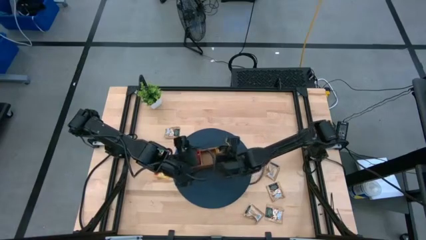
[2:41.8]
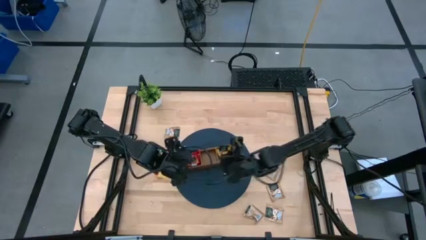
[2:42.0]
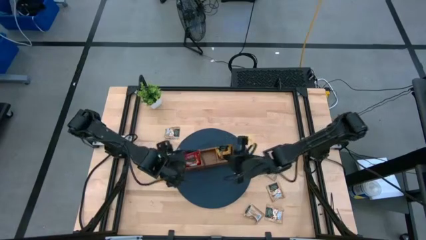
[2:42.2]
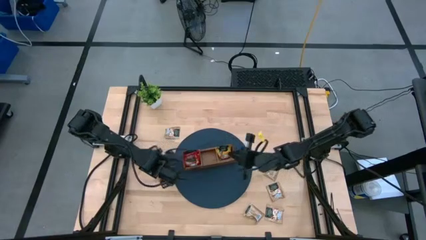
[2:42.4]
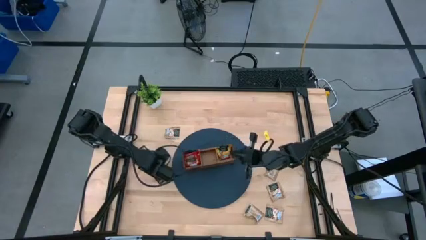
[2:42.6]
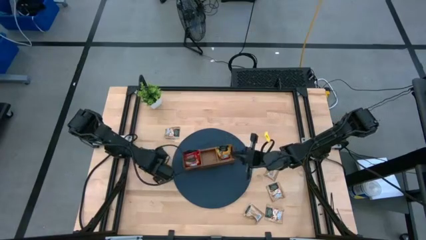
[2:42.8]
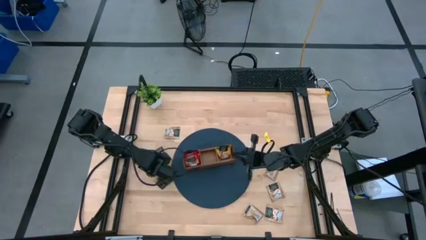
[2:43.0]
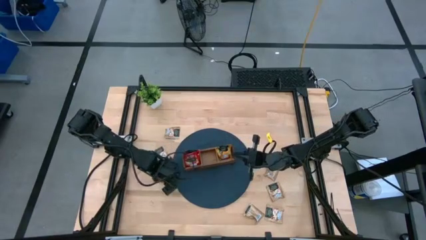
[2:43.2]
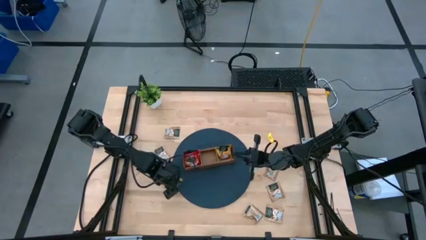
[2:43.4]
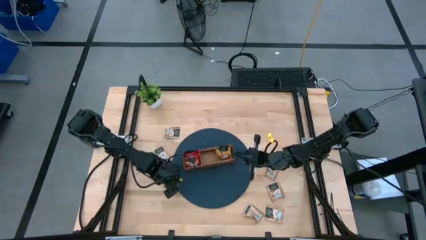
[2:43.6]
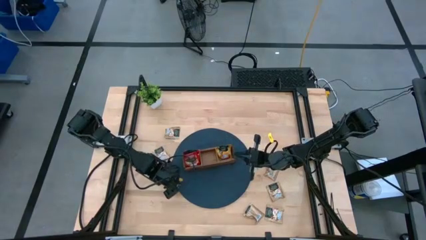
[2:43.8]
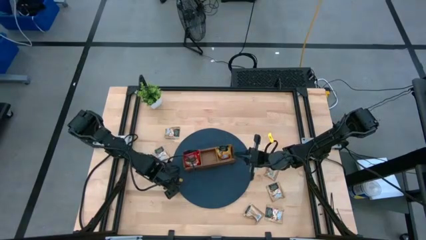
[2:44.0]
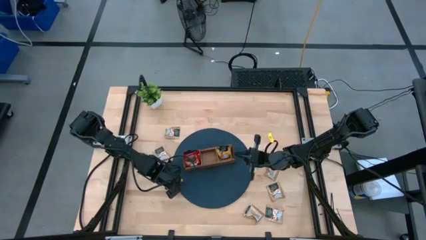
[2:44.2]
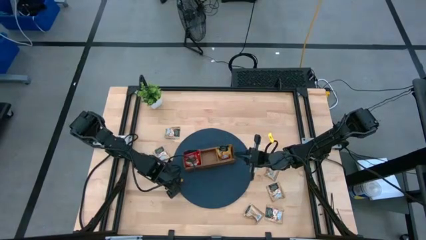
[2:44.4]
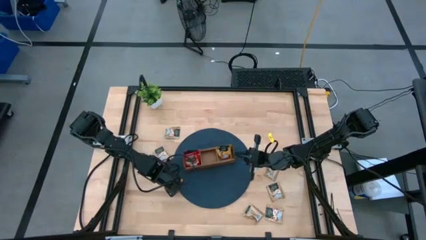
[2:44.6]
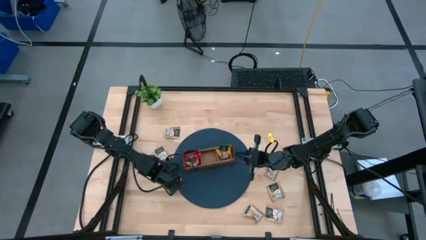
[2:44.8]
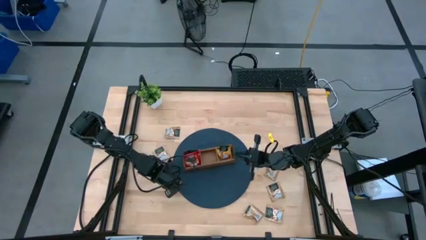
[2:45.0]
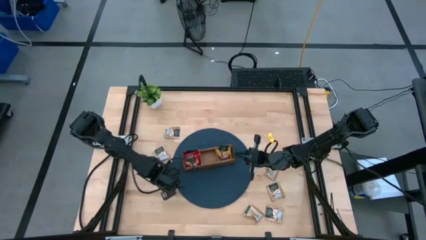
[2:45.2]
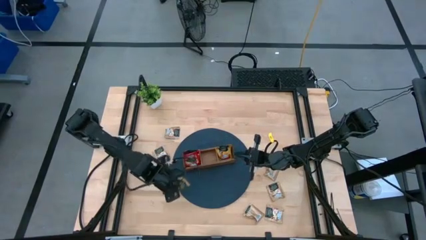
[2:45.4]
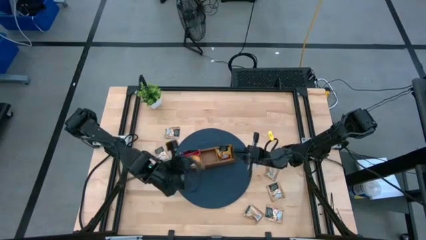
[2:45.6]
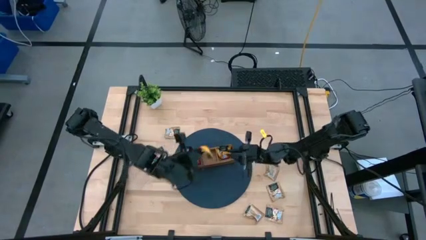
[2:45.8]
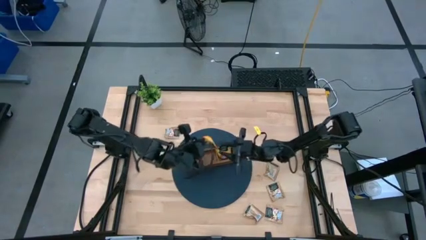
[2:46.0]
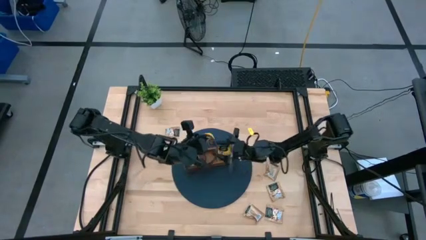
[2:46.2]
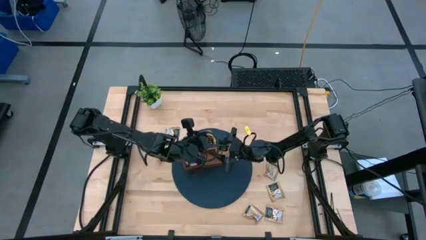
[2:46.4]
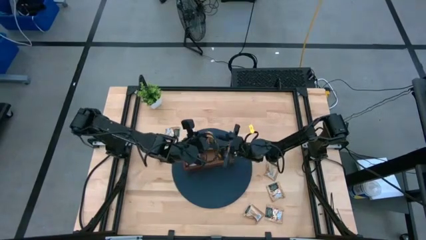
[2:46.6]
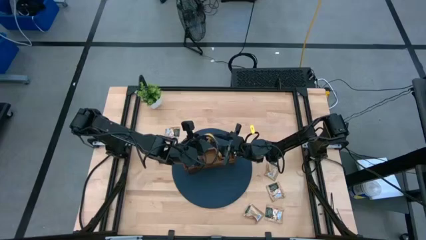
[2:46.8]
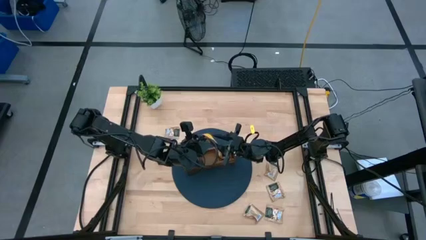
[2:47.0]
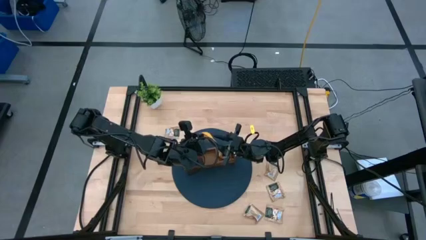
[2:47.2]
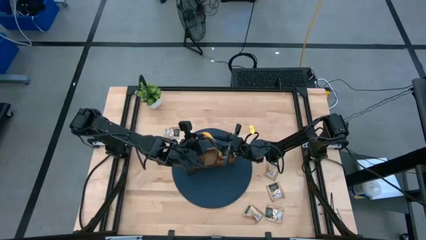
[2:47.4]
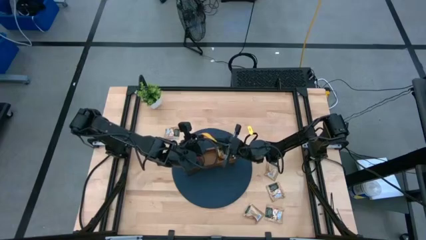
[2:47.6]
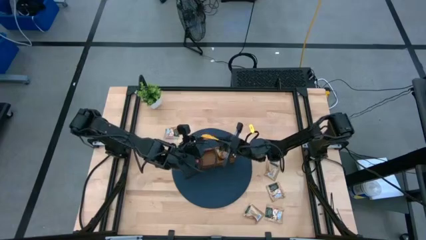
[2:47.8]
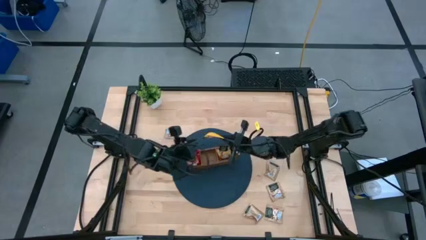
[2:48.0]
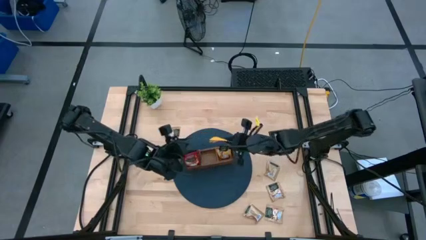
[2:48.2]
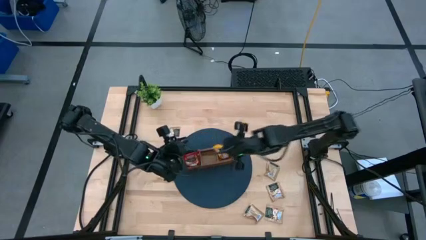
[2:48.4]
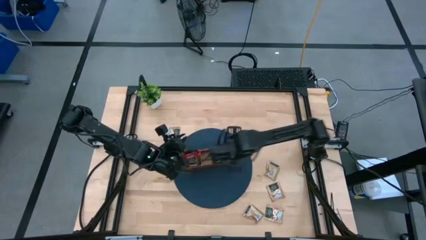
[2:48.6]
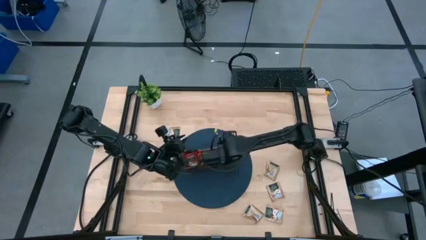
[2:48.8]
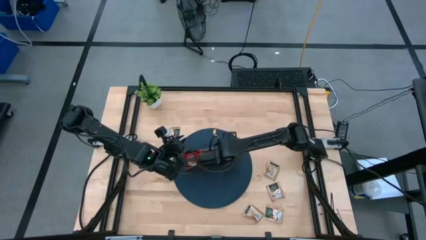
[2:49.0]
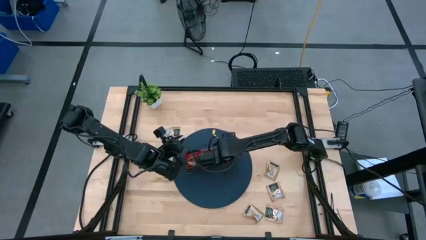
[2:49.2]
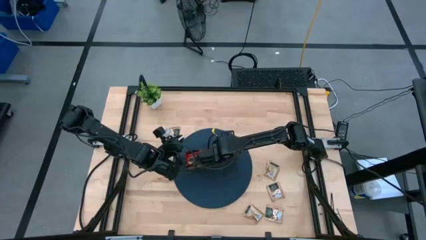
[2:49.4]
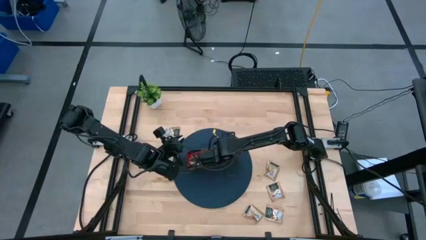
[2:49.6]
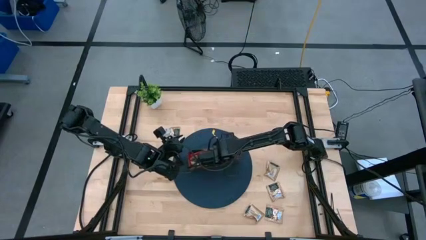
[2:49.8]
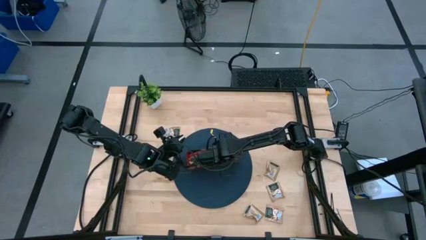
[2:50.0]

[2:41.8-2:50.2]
Task: Pick & Place Tea
Put the yellow tea bag into the right section of the wooden organizer

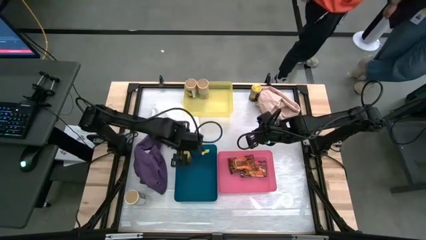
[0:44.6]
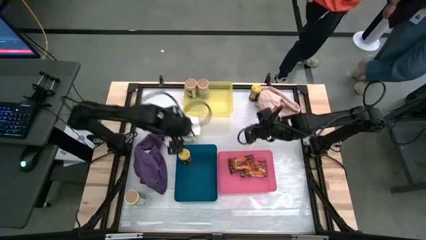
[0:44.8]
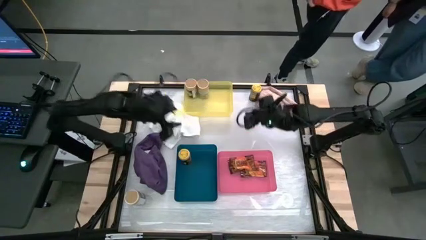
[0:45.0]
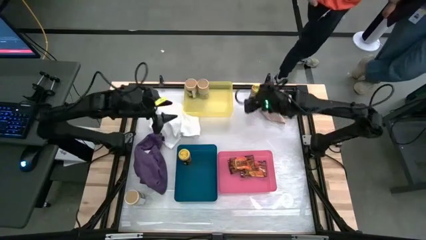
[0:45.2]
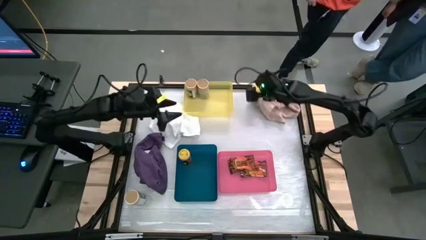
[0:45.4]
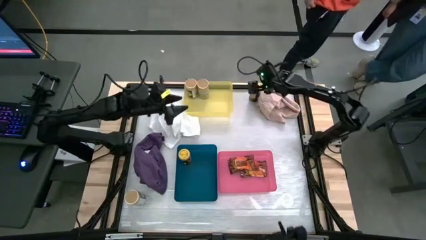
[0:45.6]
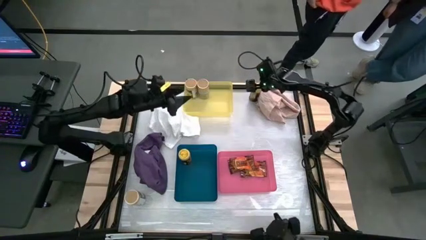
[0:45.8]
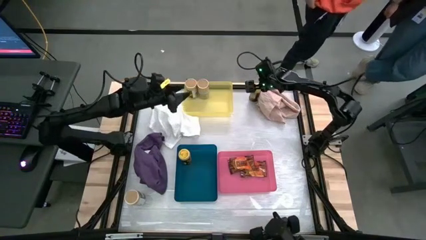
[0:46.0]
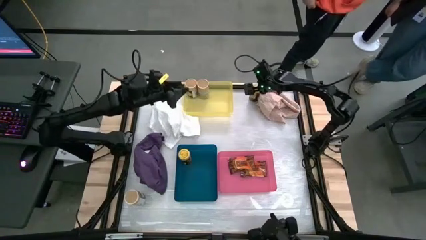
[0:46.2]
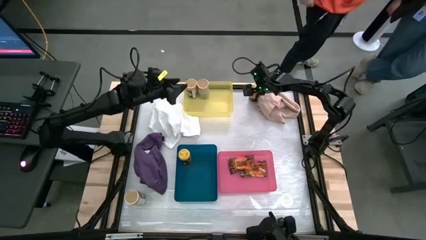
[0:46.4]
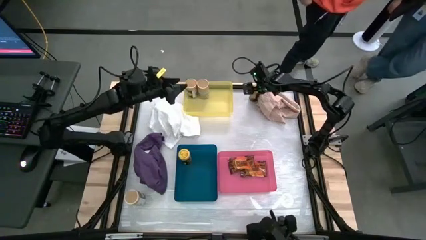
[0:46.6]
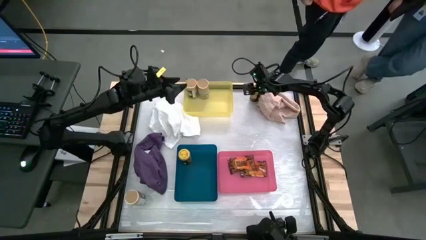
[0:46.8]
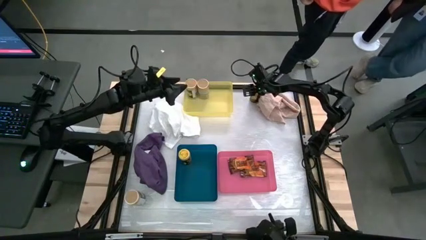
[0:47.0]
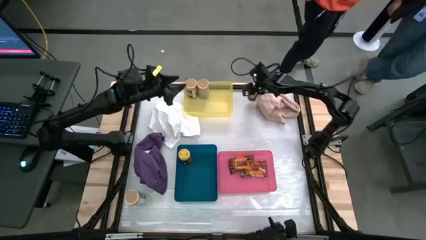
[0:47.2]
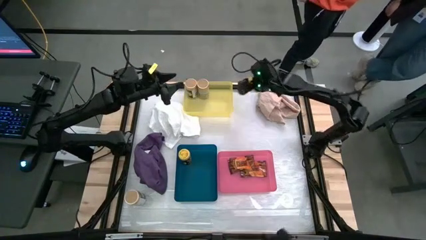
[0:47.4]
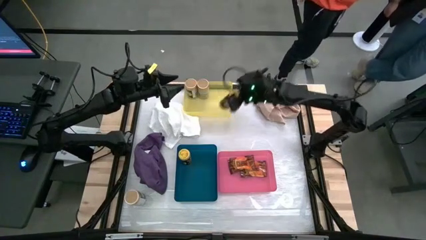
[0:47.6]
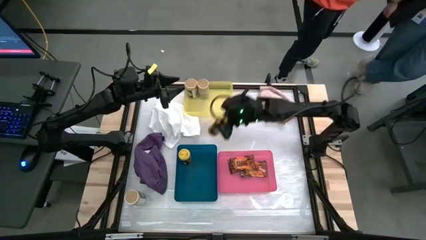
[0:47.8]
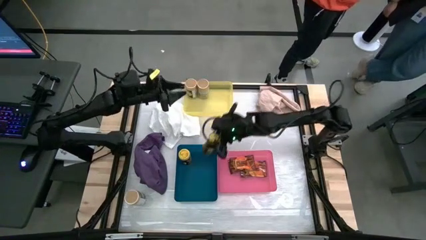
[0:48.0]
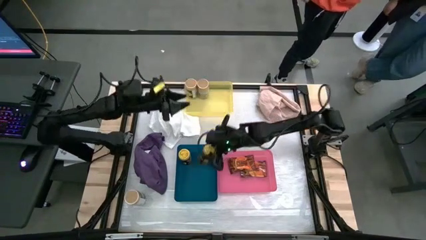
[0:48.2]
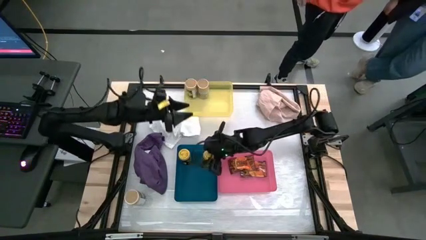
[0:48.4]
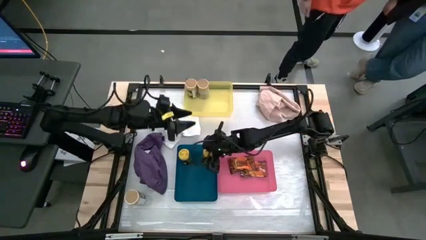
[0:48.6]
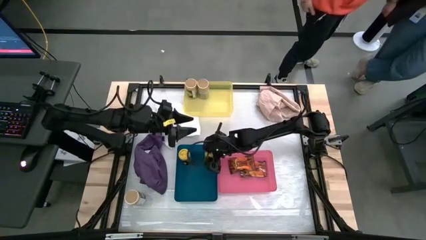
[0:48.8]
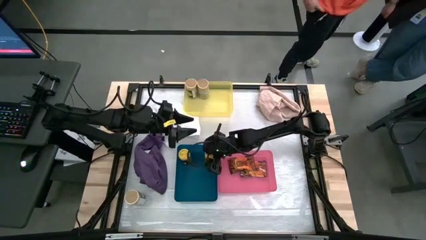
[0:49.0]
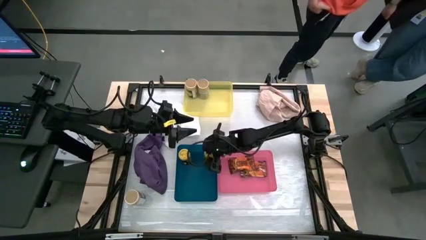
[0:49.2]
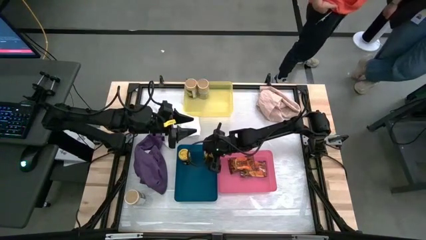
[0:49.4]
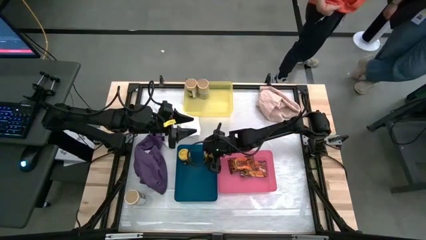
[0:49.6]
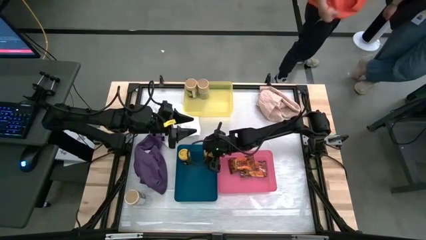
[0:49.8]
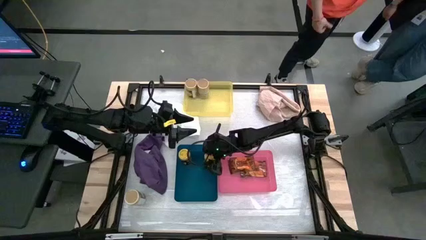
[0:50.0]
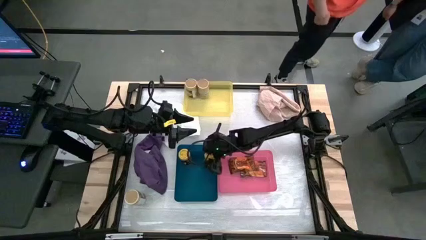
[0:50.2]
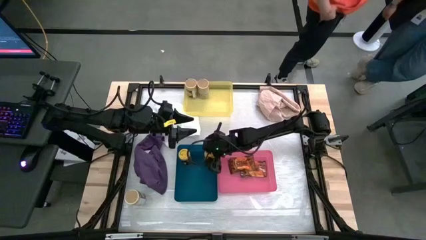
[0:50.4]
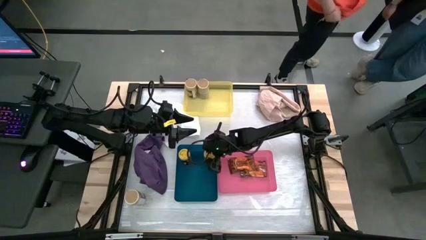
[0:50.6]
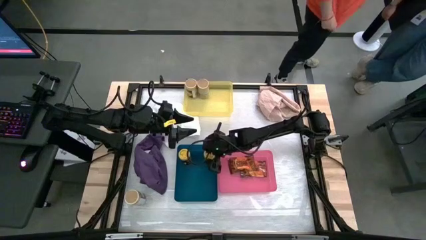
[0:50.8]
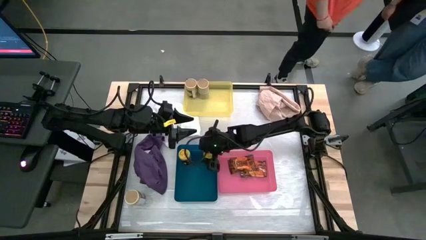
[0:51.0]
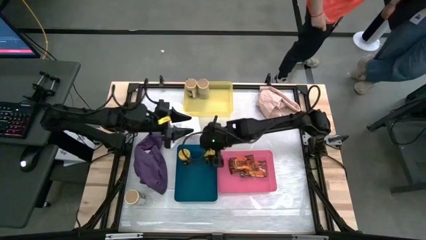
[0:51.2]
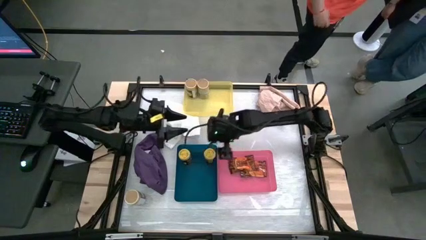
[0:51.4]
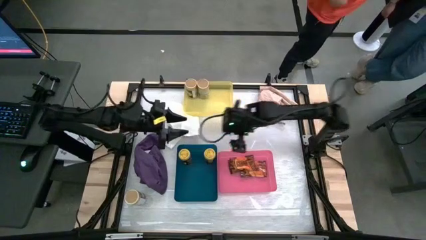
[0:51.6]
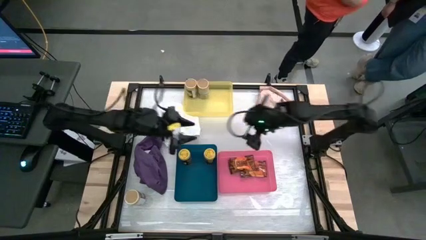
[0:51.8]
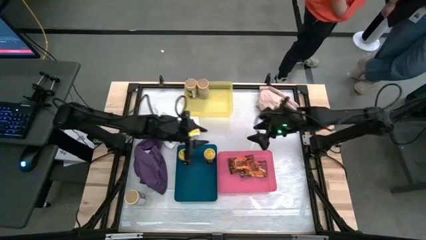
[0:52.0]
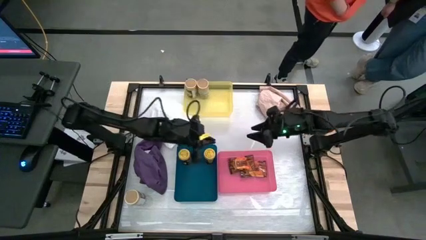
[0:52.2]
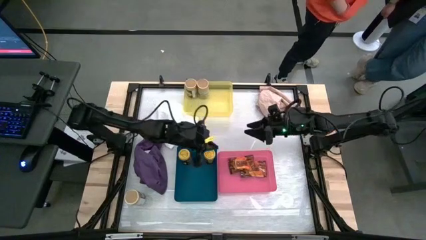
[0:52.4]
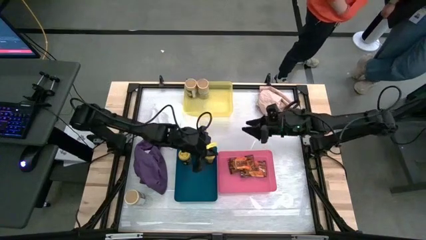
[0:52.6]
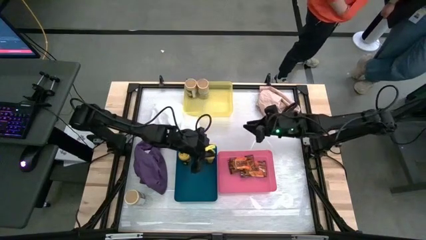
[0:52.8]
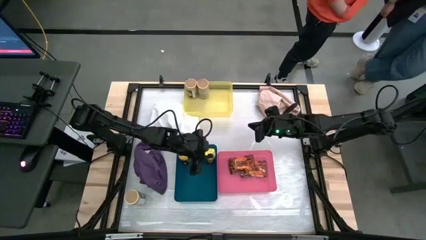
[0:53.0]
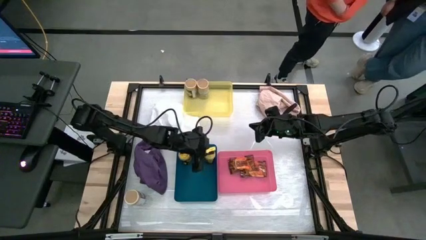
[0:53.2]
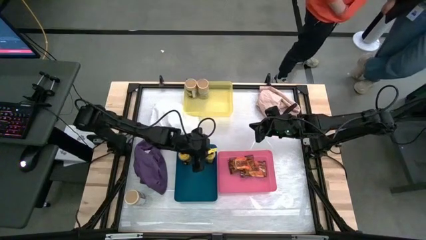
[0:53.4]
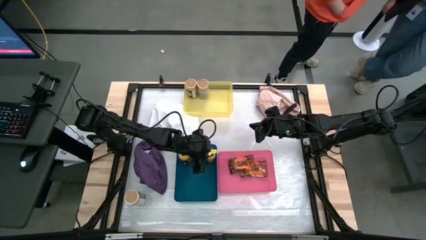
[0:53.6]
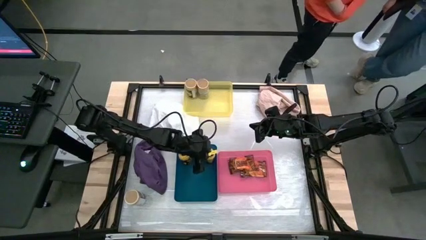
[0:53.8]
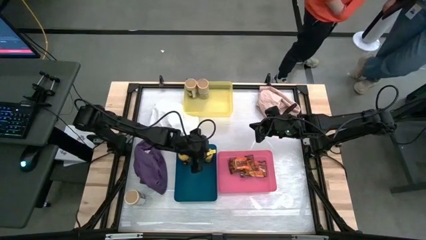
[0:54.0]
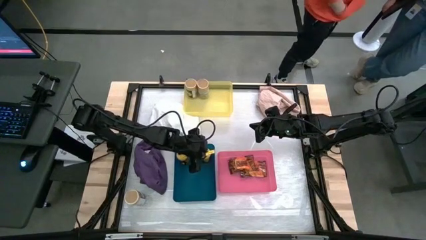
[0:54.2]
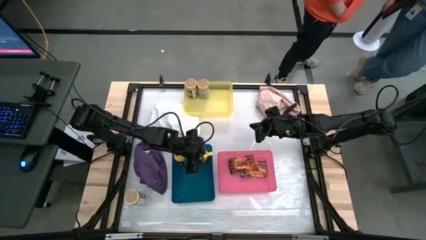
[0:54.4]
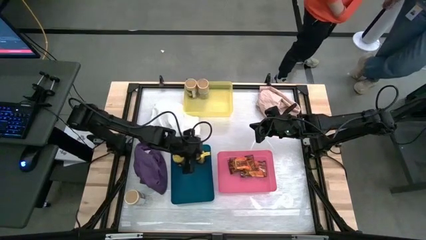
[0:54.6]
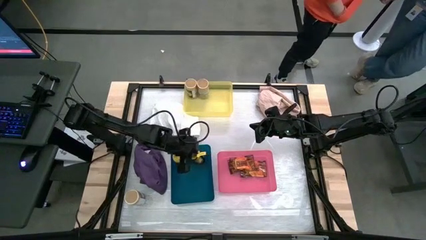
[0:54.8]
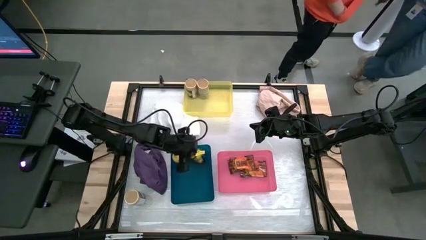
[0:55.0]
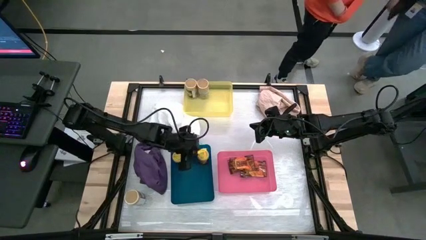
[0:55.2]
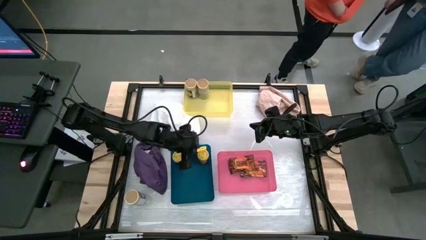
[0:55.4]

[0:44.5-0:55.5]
Task: Sort spices by type
Put the yellow seasoning bottle into the blue bin aligned with the other yellow seasoning bottle
